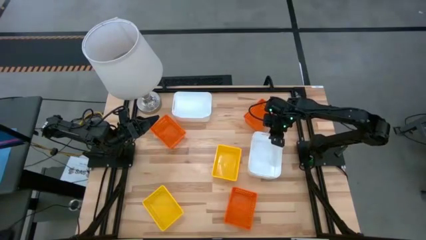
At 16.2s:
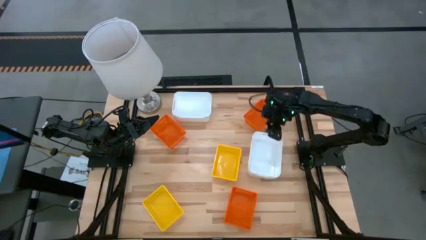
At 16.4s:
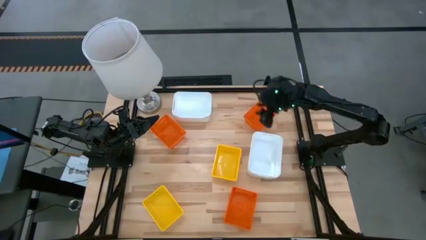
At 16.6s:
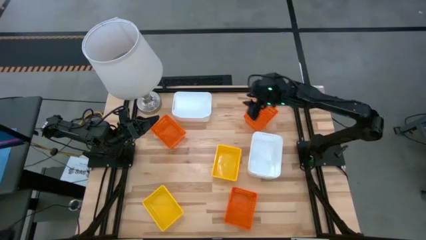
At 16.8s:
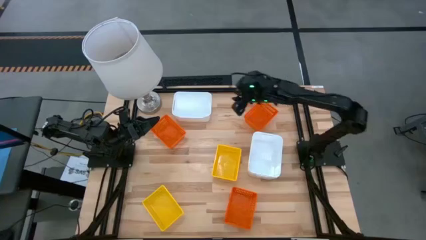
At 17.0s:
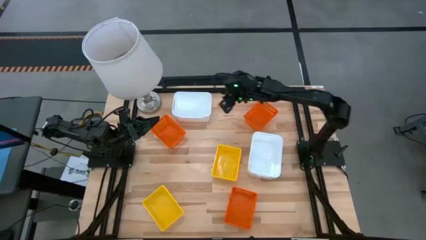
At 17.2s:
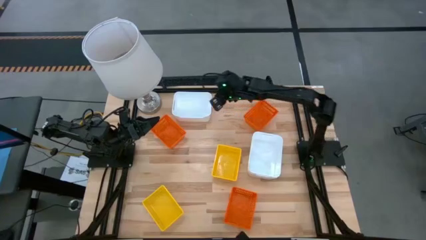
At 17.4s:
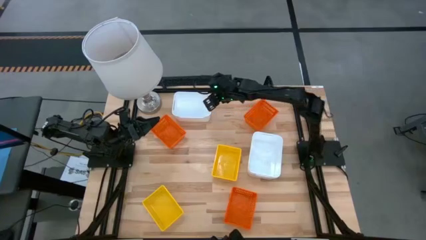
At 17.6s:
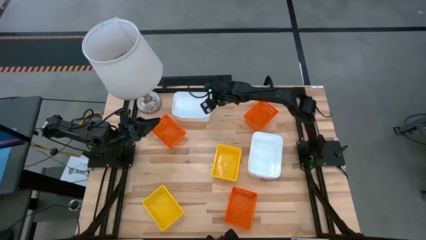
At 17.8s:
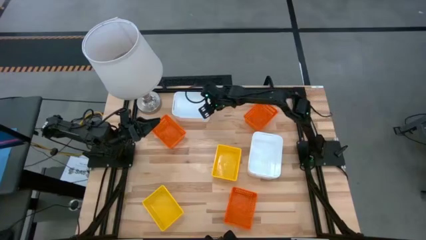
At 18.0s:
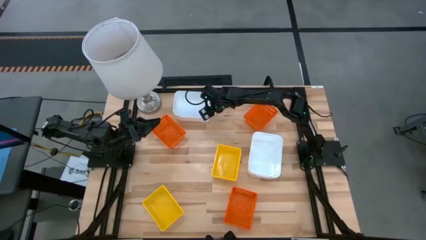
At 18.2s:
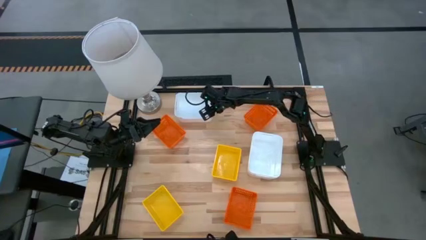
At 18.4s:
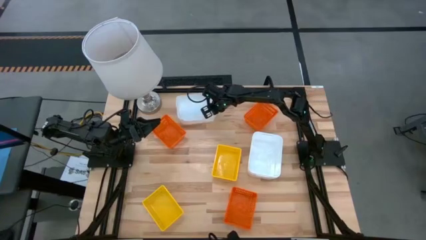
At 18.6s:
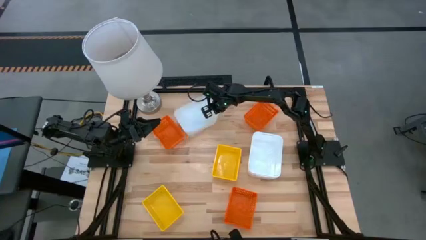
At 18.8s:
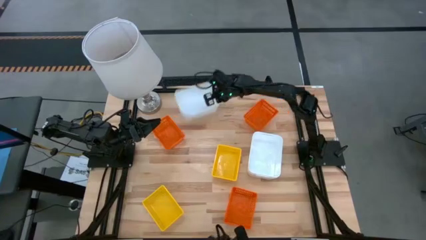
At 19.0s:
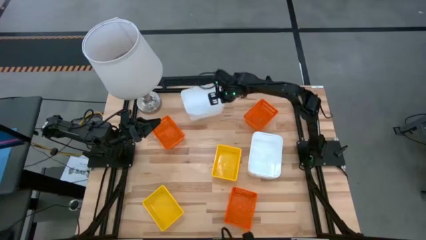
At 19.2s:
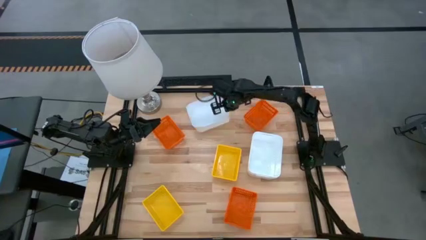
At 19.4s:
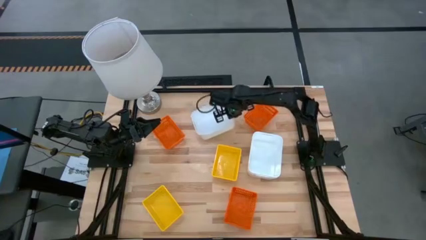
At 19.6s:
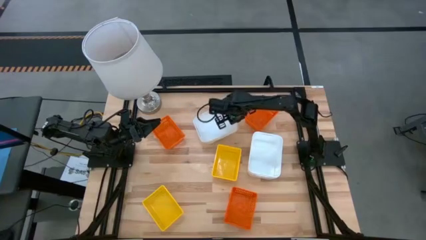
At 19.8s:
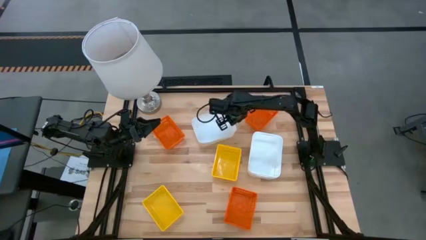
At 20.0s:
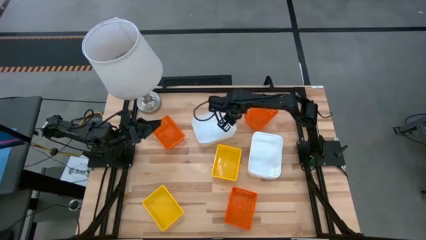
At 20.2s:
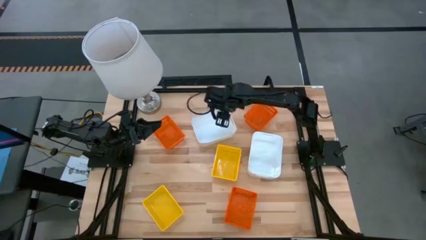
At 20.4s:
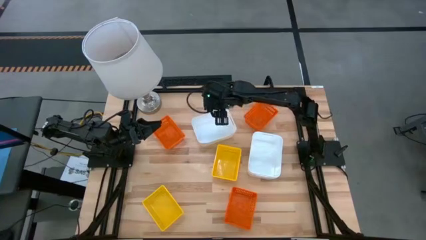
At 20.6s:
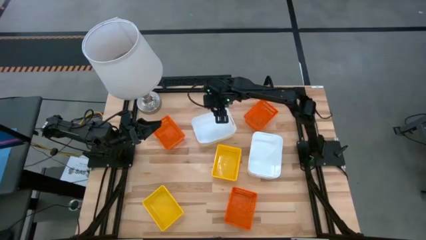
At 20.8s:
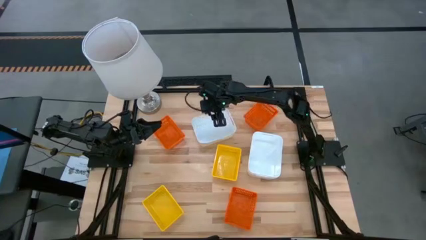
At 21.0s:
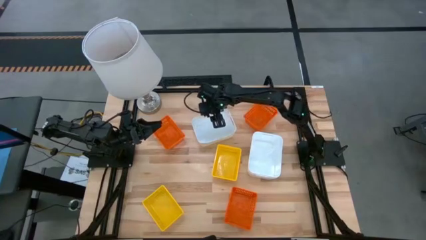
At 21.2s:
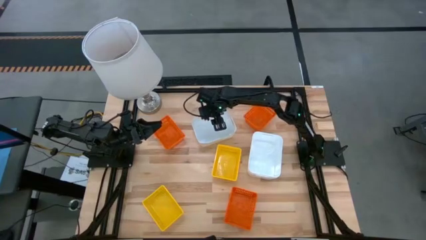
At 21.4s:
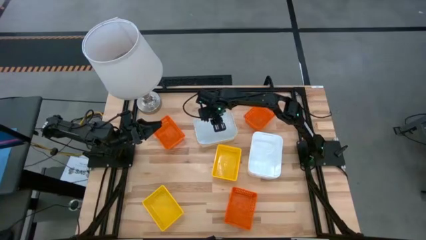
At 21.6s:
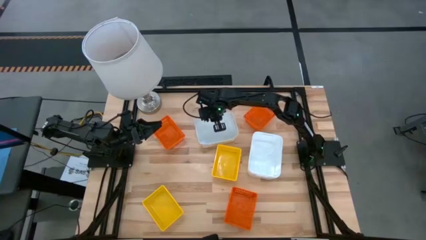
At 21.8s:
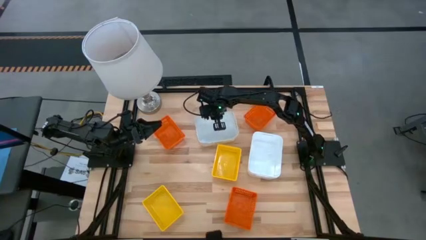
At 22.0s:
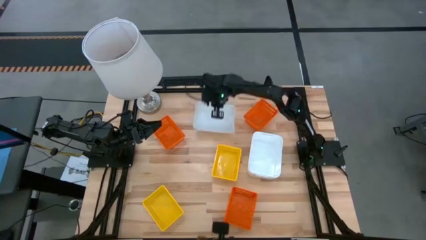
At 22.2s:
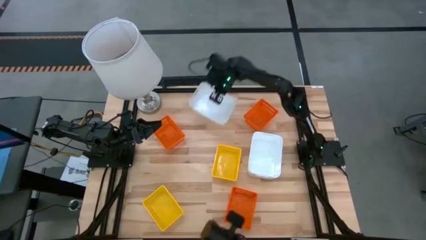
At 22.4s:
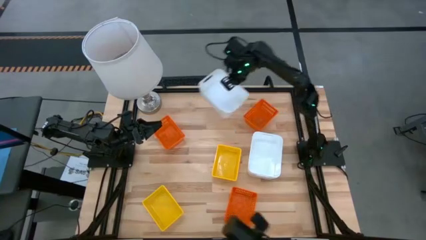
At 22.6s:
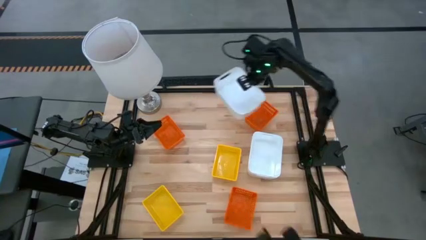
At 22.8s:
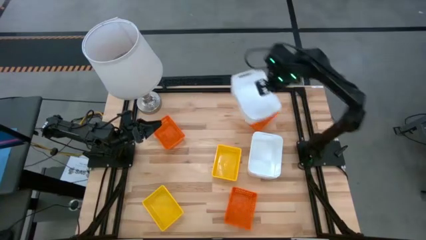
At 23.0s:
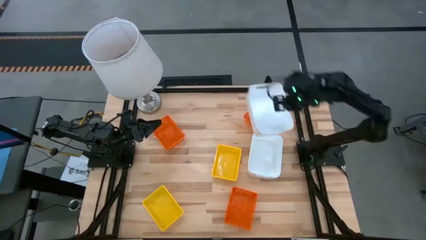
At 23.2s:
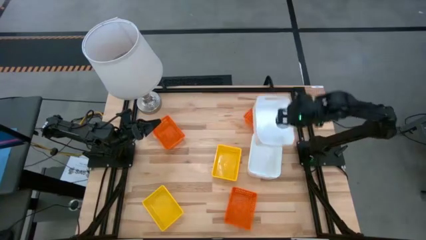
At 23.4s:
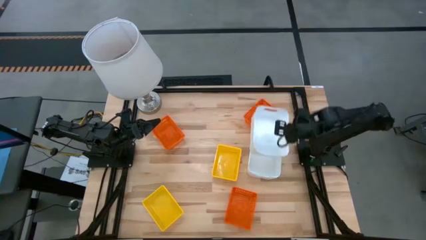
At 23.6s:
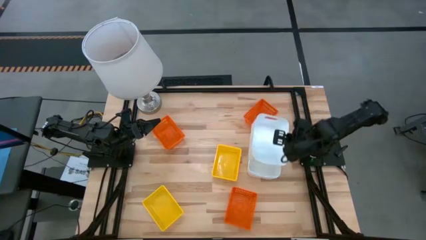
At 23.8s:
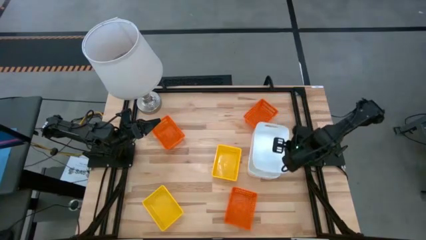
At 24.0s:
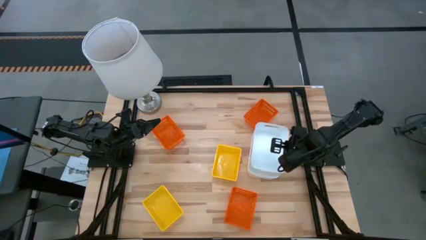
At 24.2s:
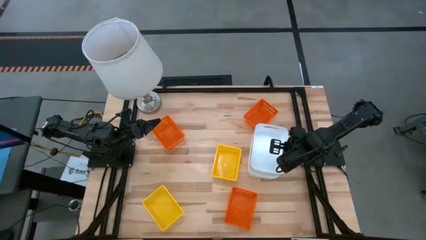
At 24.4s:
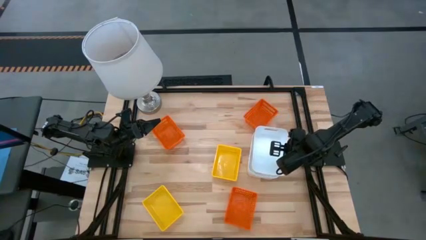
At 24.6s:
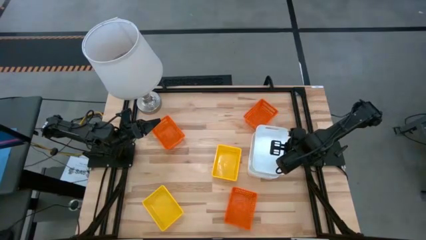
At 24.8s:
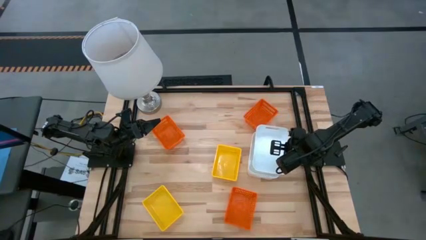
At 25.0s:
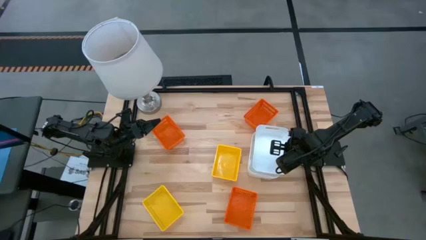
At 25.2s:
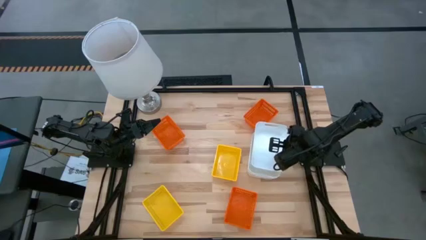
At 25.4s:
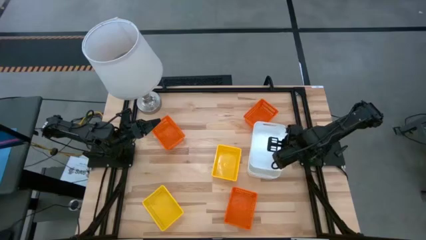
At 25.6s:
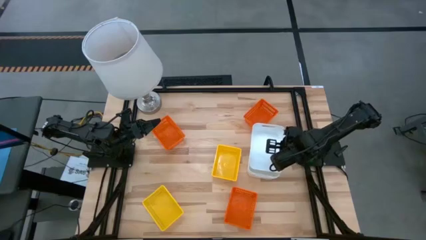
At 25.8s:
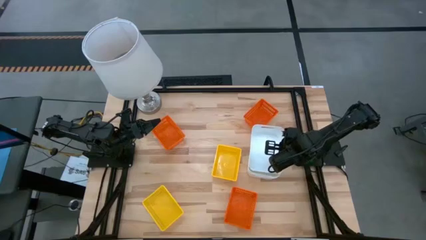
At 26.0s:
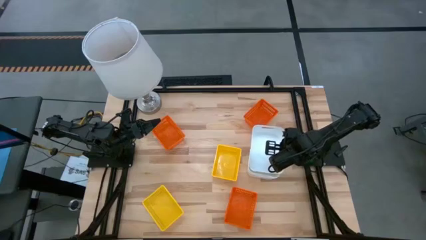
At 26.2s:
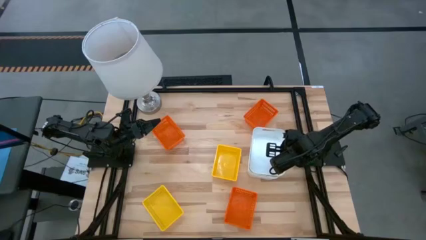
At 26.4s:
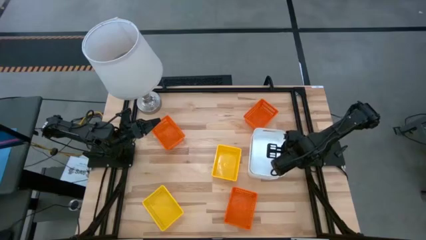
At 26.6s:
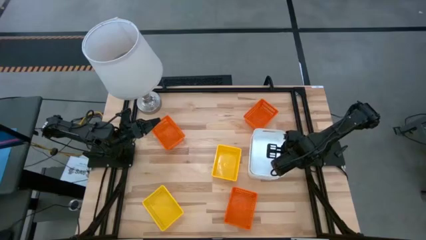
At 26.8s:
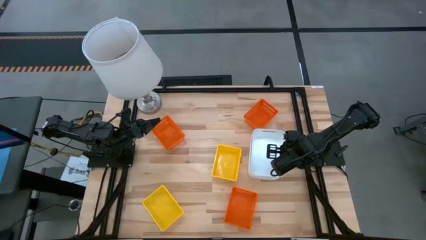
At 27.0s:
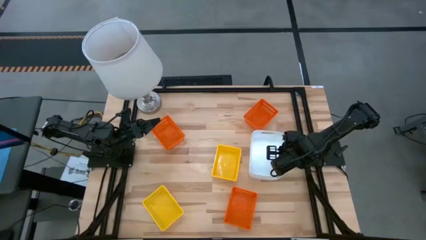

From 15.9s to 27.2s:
Stack the top white bin on the bottom white bin

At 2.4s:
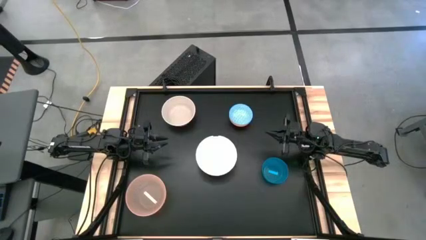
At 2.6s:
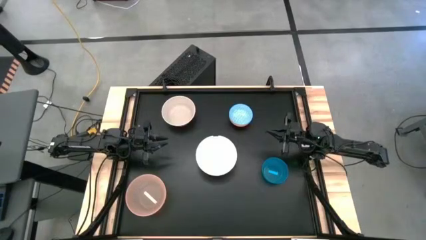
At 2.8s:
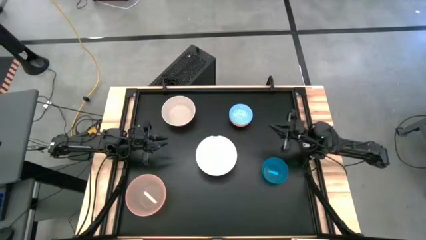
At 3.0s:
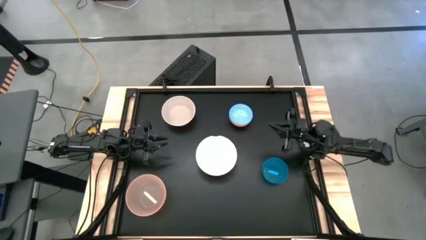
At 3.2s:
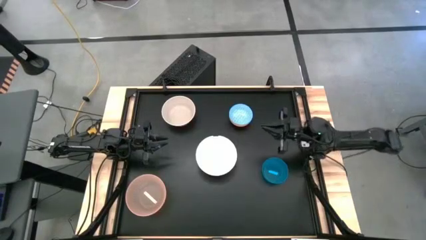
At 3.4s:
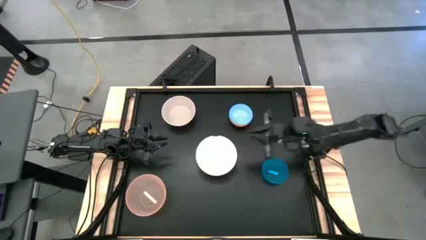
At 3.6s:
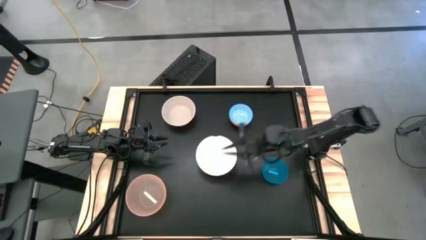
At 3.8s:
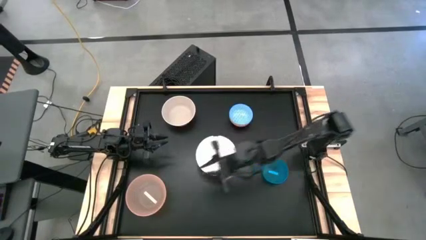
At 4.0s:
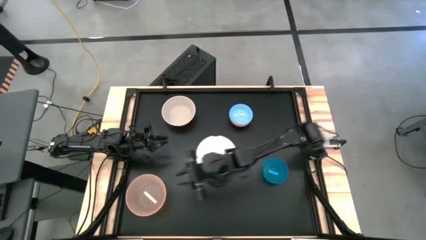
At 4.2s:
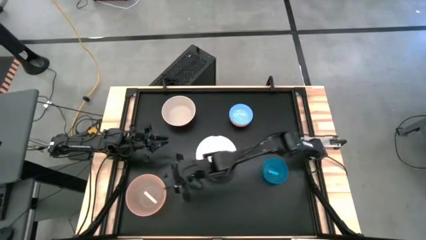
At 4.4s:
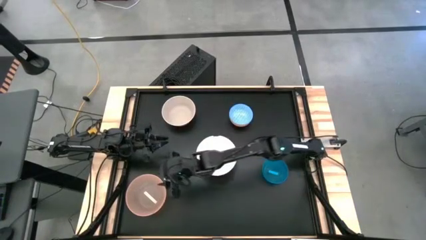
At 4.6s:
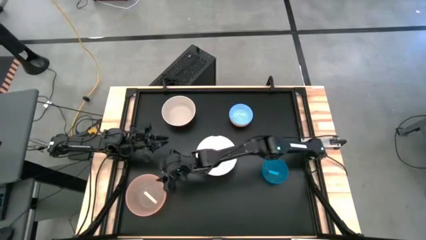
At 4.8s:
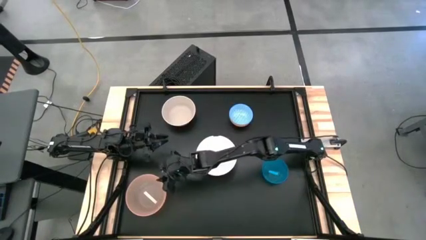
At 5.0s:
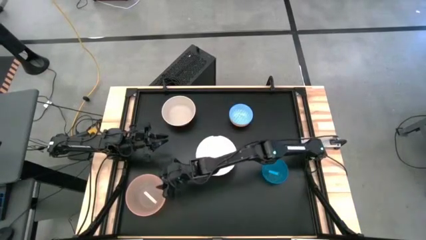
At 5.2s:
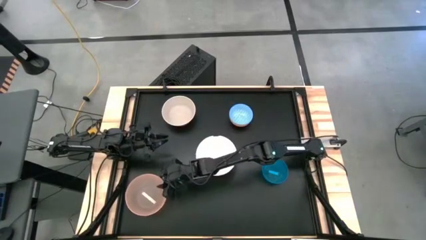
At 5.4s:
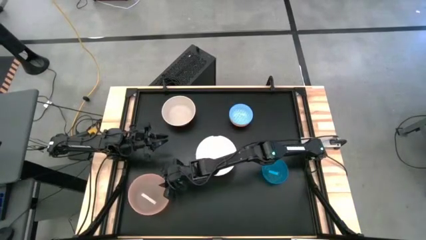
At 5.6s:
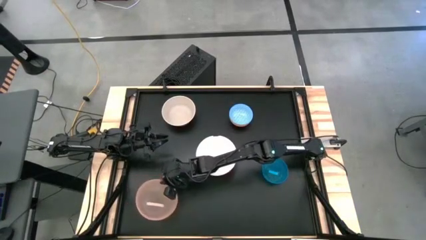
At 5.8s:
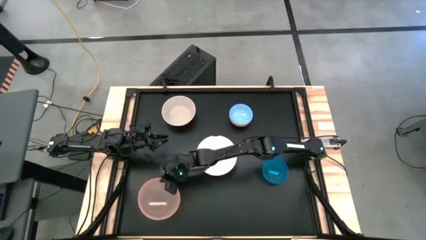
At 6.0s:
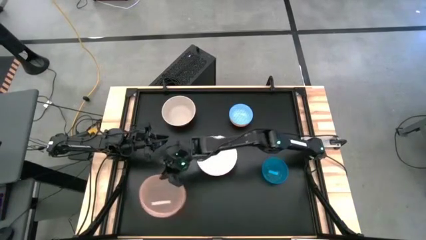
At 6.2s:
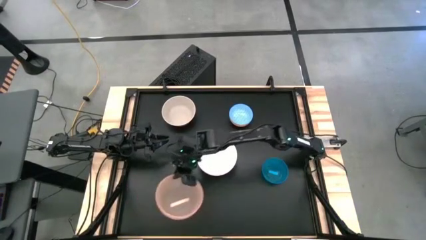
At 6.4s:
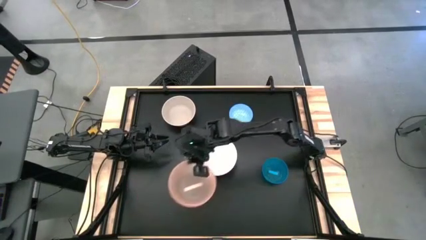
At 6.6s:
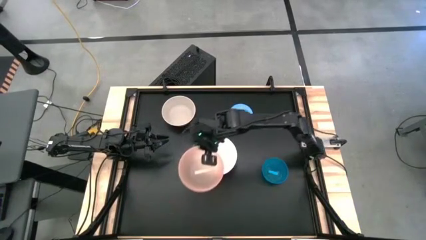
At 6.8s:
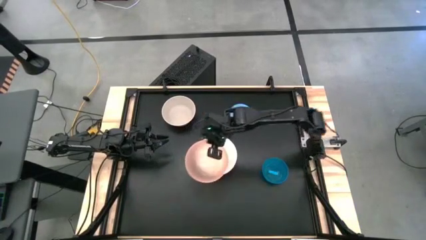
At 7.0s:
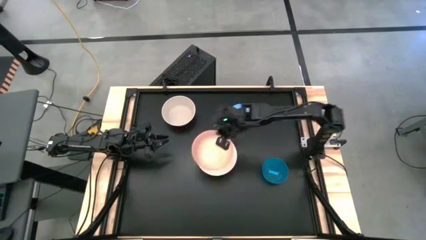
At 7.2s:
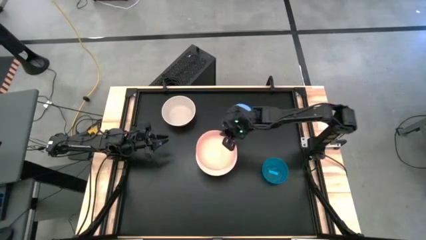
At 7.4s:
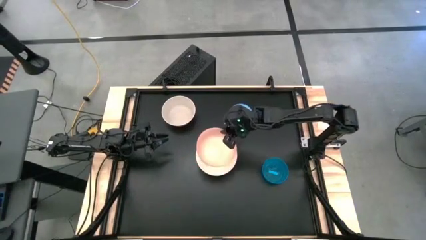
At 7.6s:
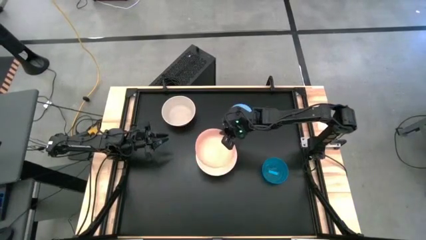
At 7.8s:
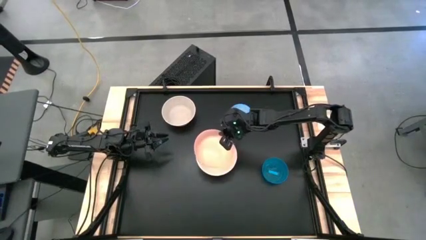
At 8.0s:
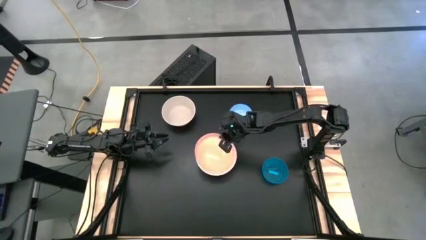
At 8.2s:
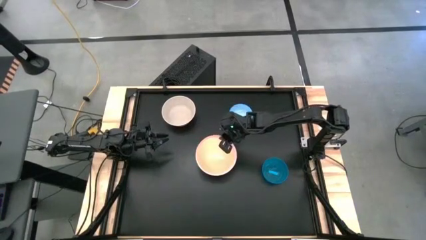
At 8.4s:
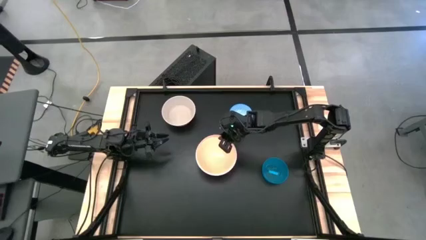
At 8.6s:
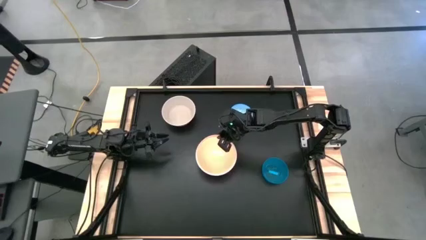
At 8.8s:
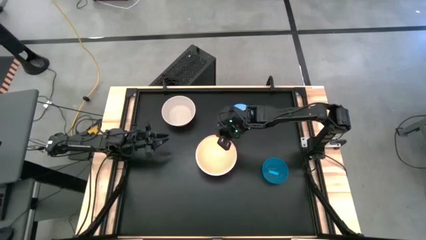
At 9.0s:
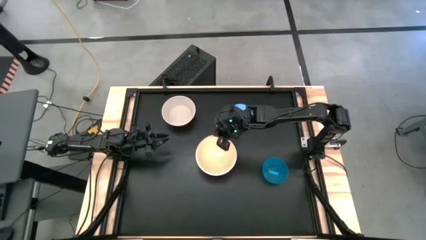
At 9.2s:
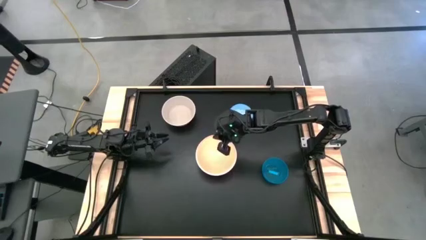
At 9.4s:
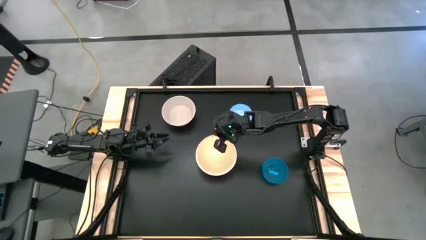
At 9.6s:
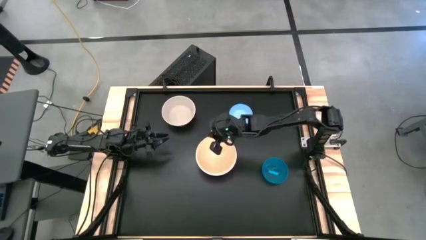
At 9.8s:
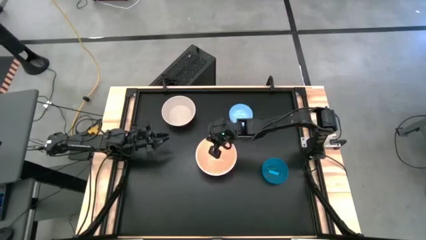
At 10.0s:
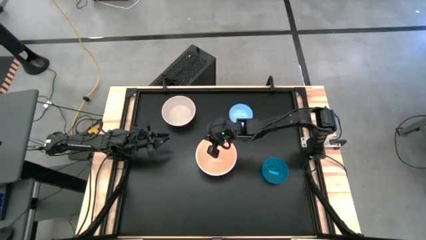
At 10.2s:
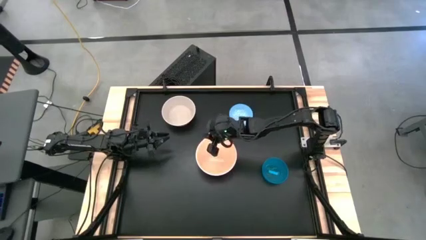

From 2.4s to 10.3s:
Stack the light orange bowl on top of the white bowl
